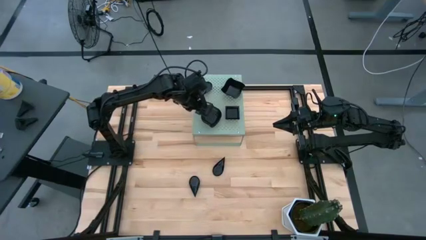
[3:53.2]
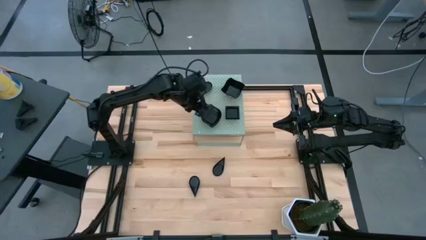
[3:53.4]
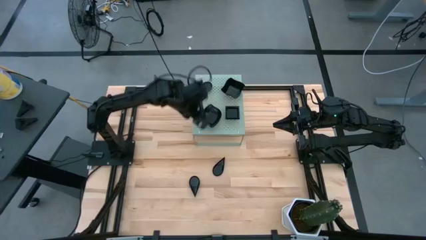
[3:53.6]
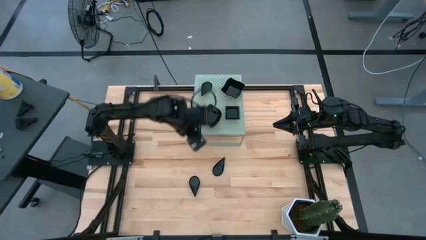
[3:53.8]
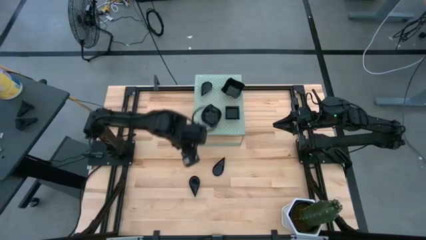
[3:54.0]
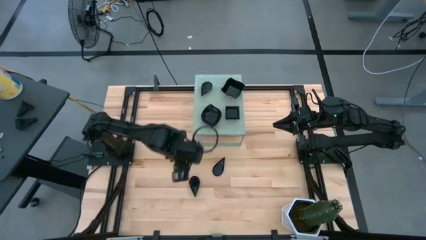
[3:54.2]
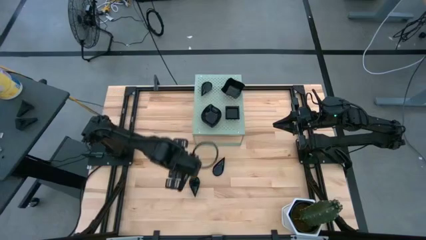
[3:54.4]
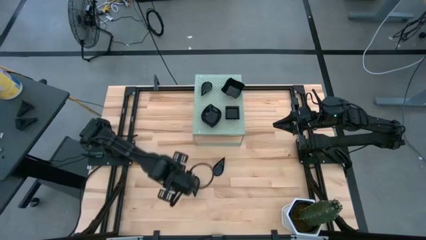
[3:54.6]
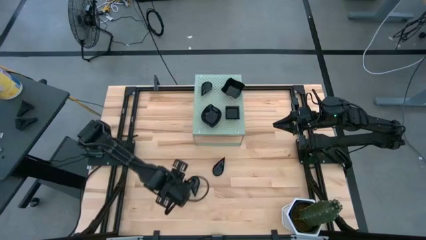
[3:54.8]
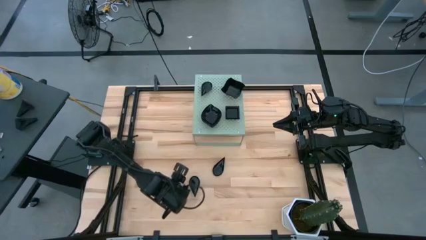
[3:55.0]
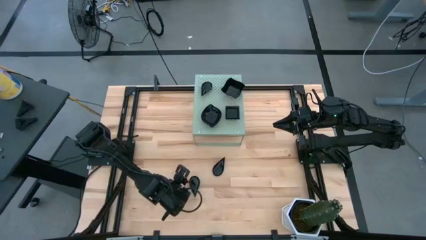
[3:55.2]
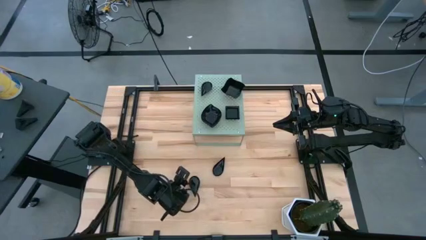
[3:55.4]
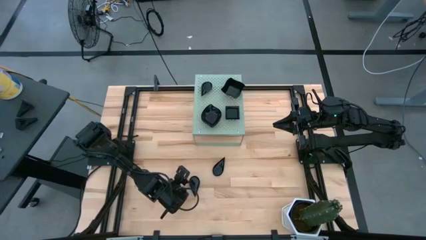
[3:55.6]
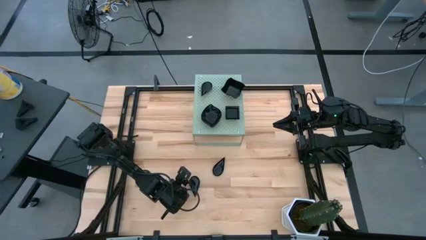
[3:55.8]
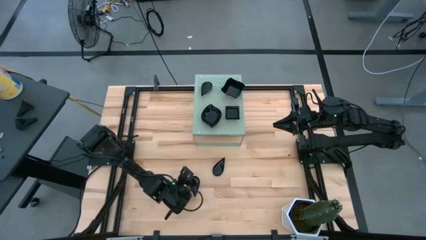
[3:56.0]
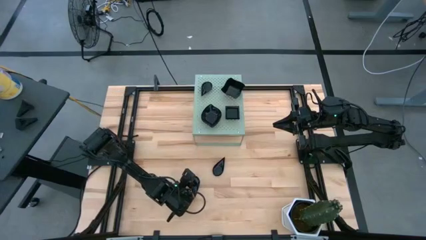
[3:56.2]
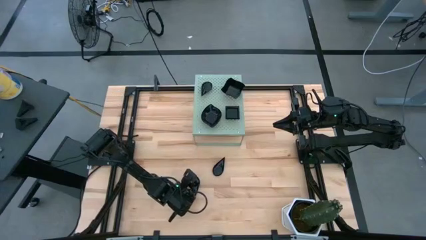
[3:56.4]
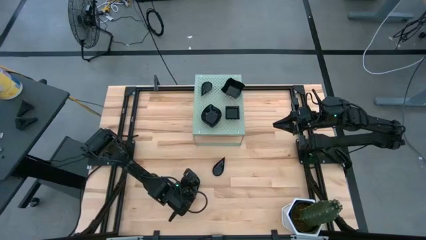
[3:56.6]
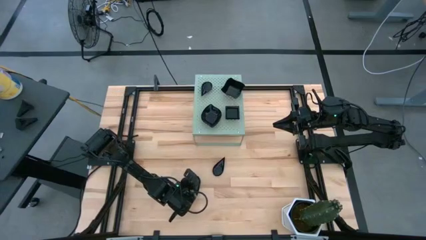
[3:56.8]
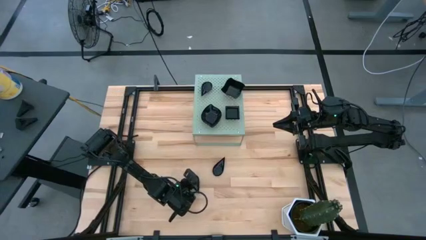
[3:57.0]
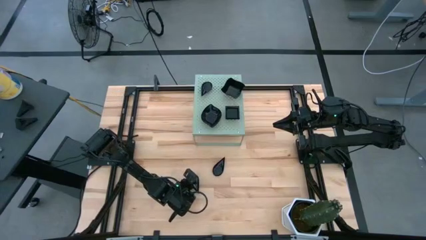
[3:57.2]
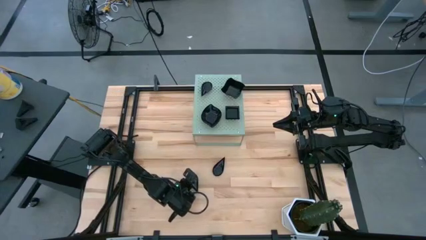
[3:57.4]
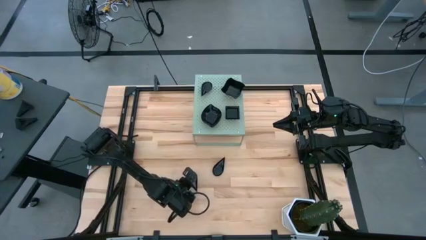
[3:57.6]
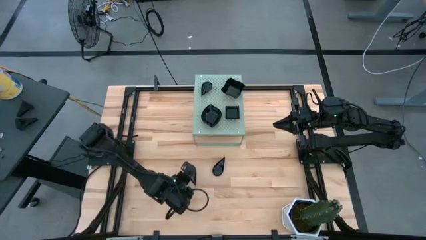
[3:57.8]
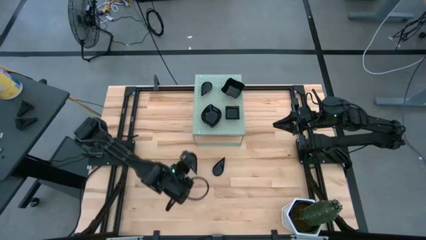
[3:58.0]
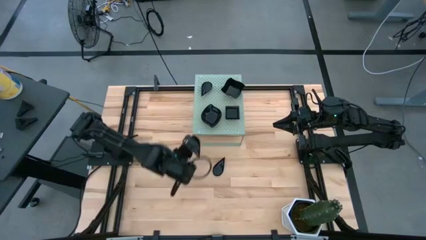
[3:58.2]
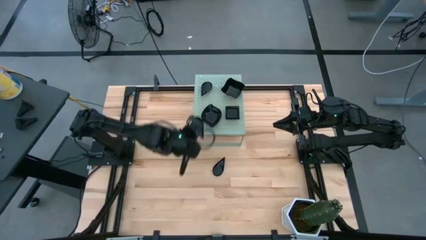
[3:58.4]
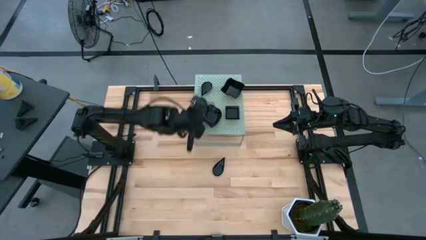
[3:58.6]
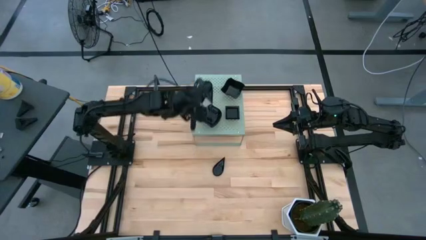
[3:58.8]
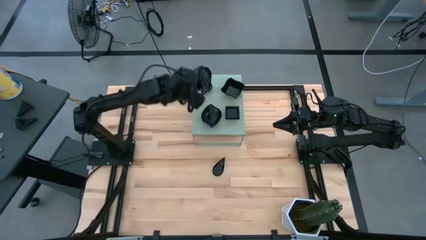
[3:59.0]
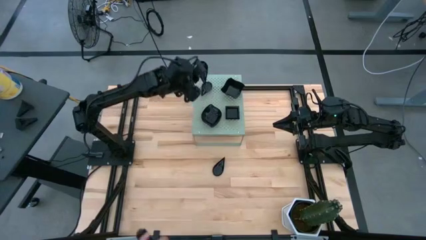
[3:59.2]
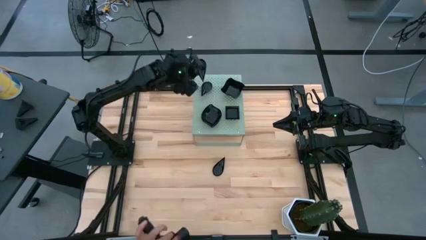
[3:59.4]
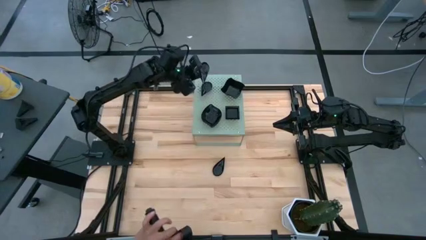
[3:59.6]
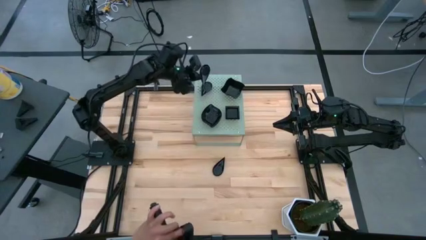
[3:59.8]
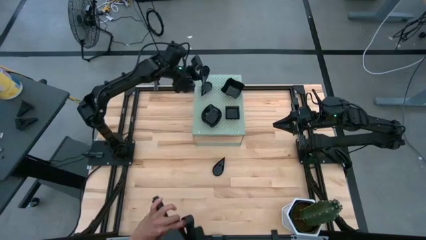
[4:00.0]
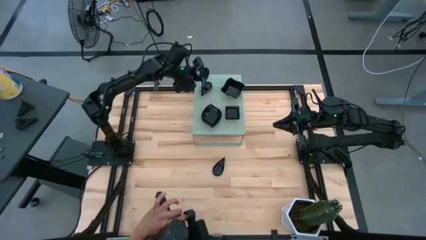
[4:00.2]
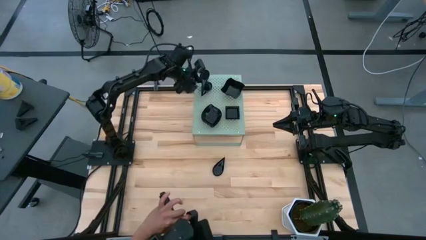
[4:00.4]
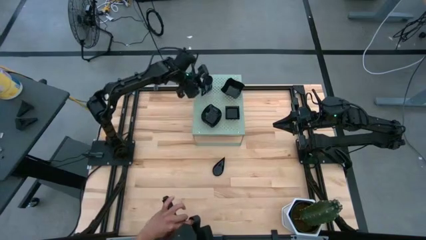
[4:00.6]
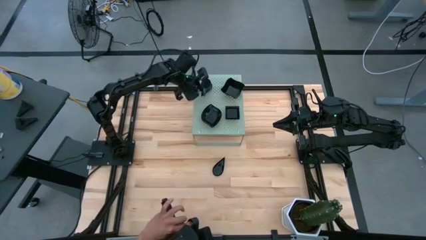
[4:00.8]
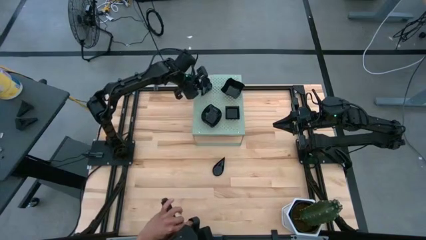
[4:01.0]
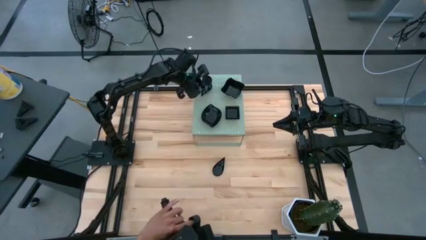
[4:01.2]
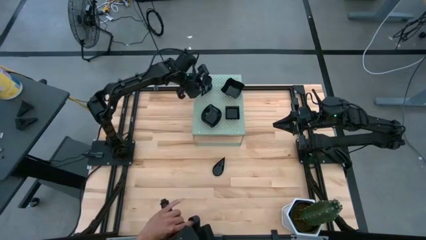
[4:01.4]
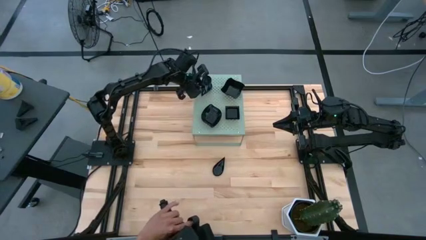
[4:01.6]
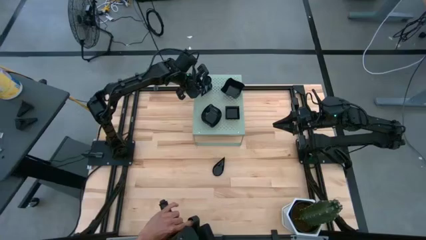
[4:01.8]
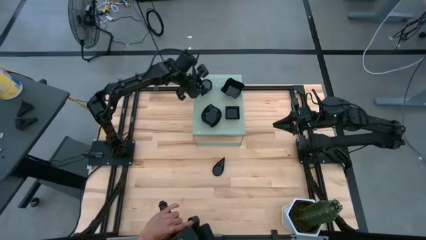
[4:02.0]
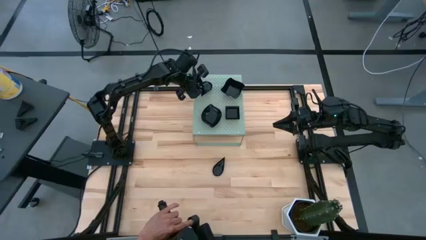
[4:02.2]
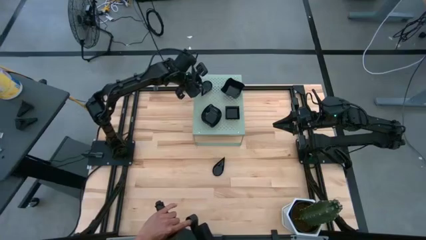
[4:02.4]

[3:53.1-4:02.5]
Task: Pick & Place Mini shaped plates
Stack the drop shaped plate on top of the drop shaped plates on the shelf

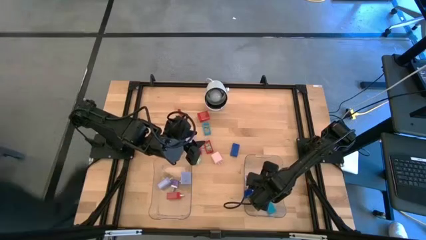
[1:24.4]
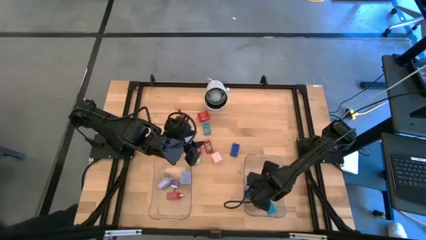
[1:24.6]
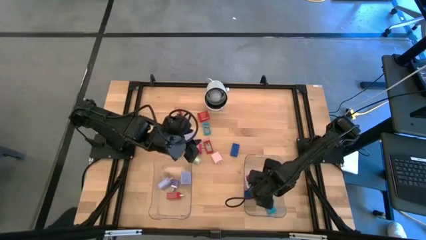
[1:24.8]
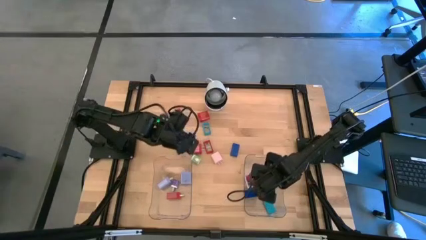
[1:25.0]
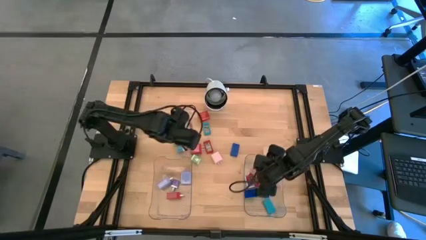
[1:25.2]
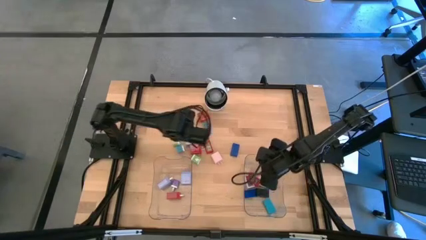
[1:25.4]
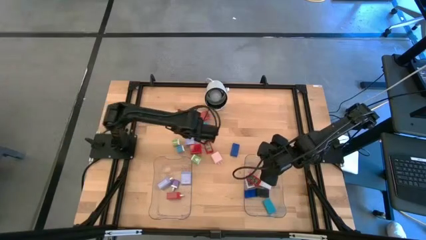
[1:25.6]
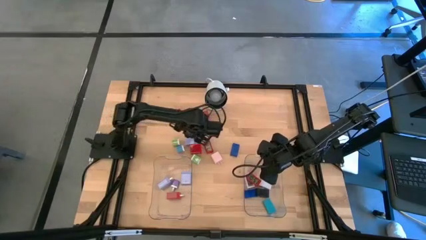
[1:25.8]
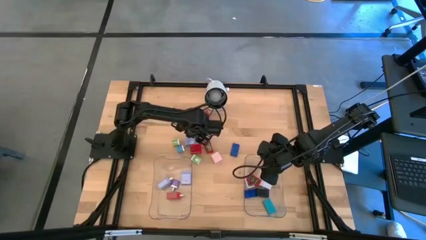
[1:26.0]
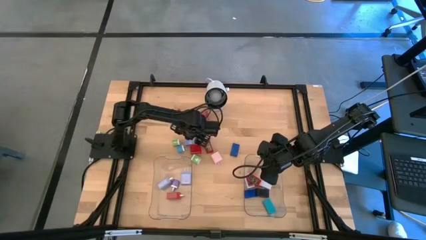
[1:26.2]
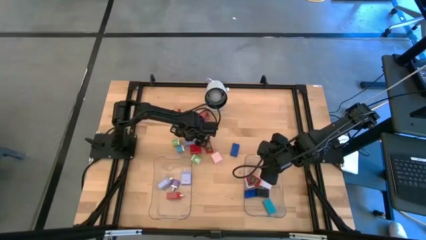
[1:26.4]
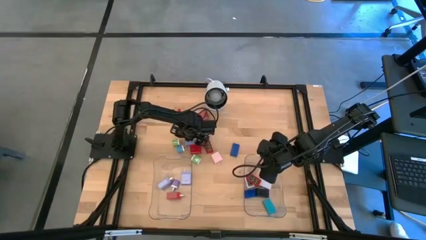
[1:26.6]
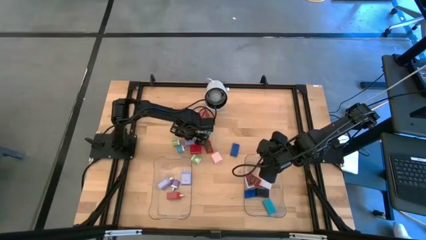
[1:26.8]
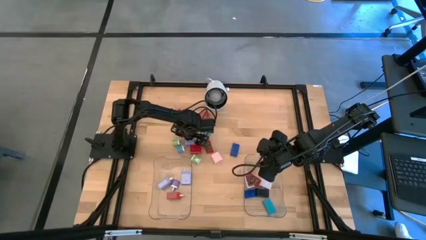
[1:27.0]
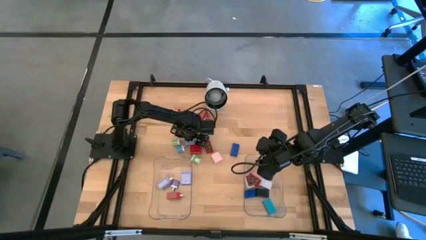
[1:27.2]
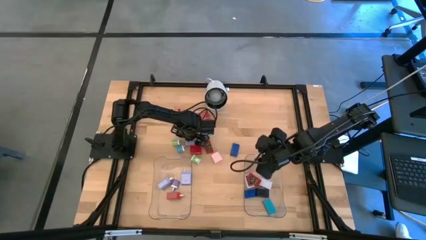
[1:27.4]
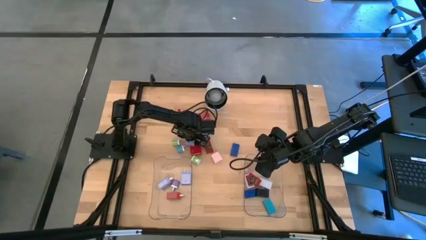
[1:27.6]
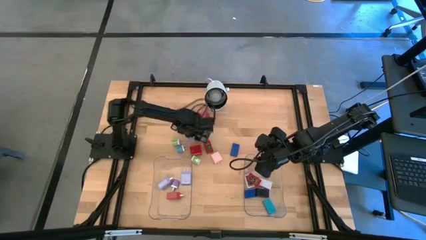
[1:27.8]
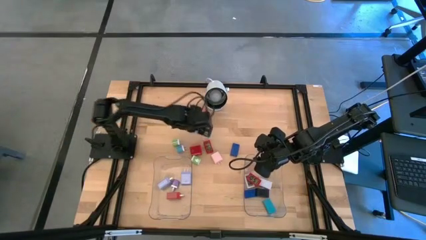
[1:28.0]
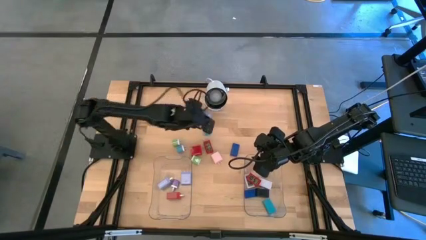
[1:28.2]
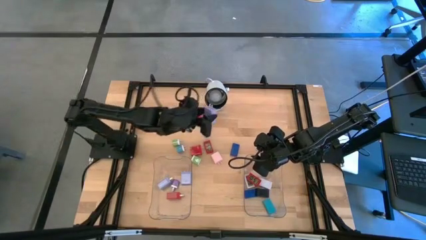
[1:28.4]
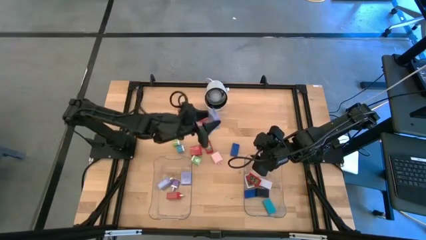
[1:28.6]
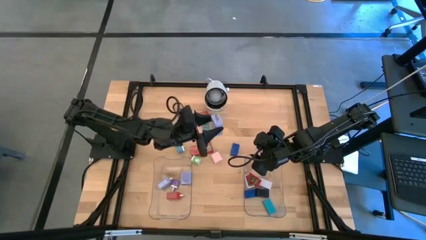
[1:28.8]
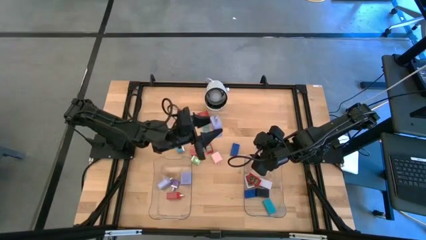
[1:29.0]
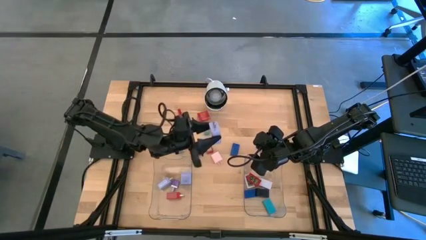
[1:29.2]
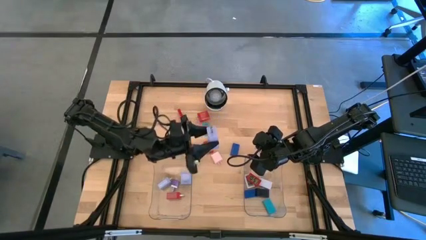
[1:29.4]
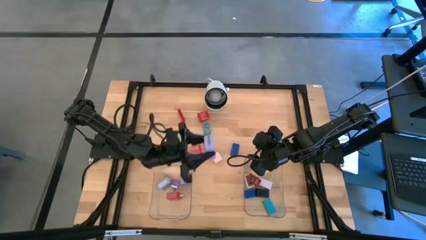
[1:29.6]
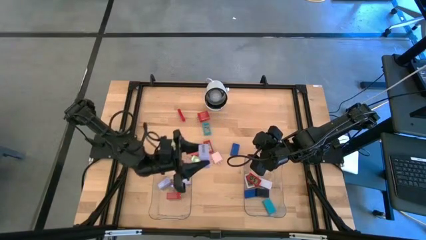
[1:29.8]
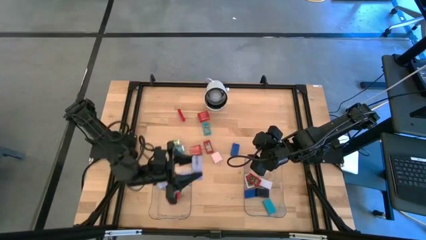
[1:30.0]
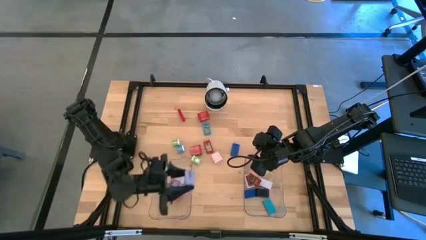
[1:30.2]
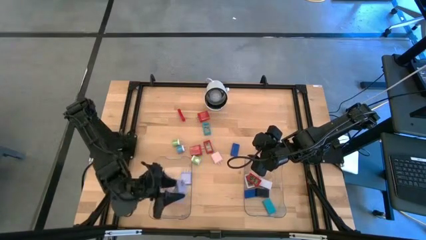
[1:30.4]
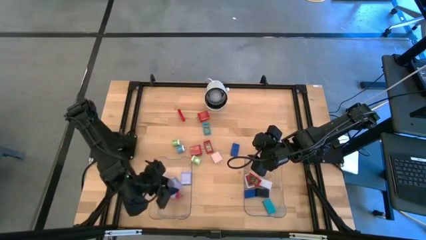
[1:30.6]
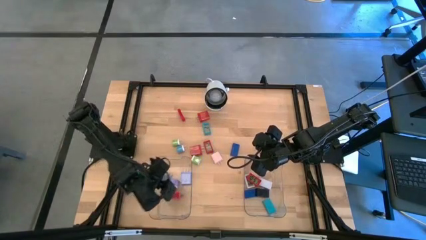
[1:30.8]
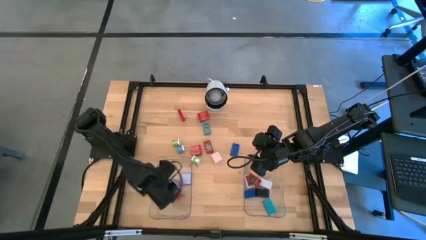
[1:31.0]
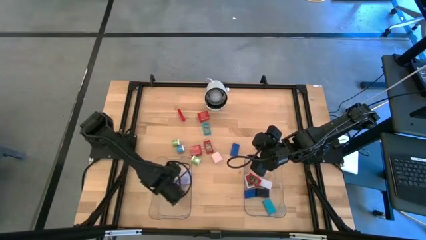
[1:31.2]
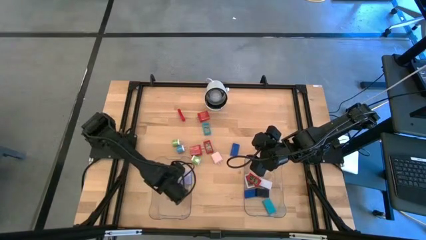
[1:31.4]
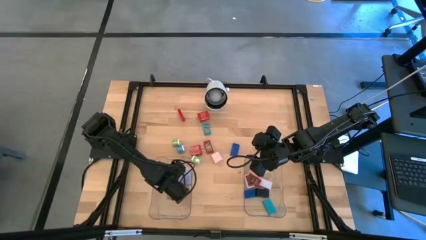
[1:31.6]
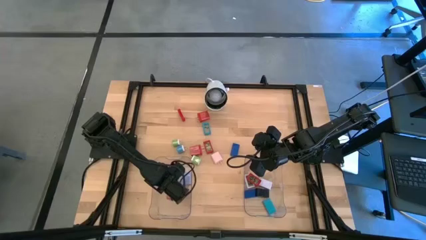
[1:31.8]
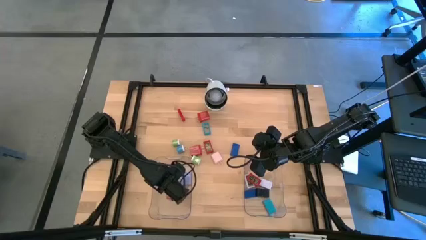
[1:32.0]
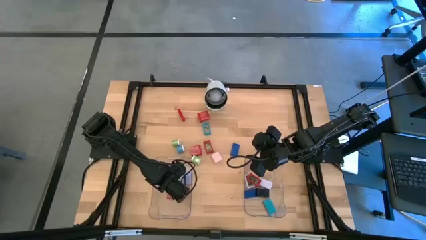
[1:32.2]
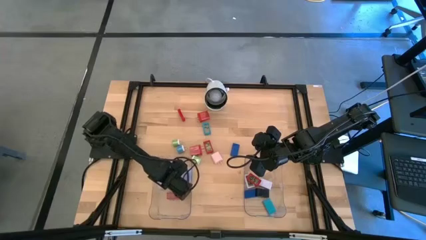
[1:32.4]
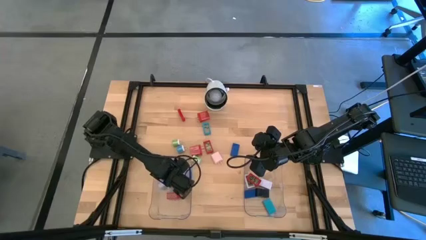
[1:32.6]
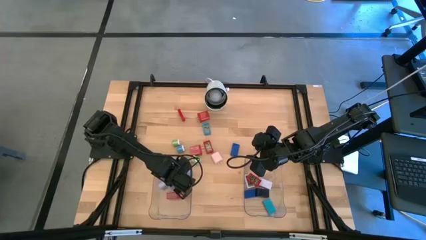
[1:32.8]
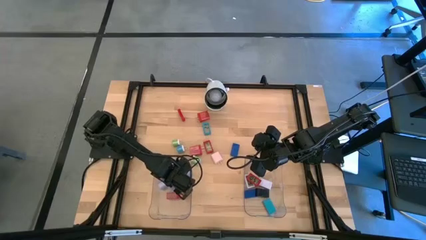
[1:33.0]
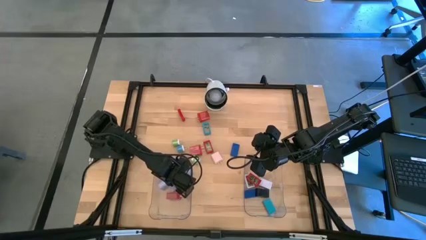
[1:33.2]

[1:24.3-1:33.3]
Task: Pick & Place Office items
Put the purple charger adapter into the left transparent bin
